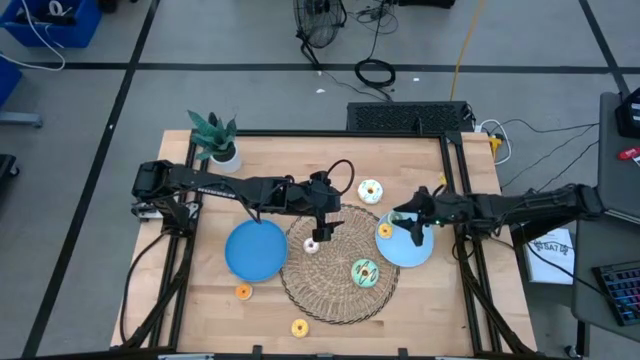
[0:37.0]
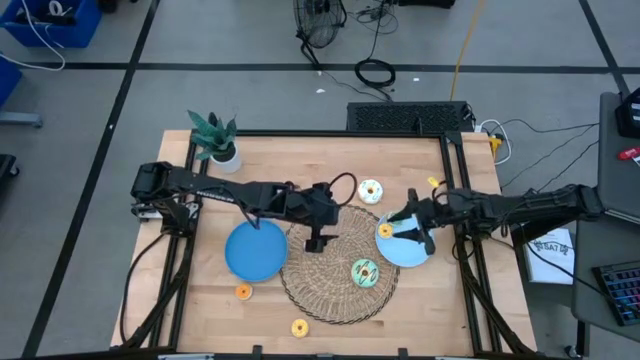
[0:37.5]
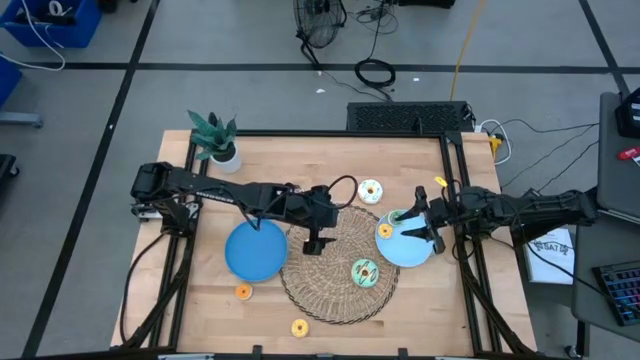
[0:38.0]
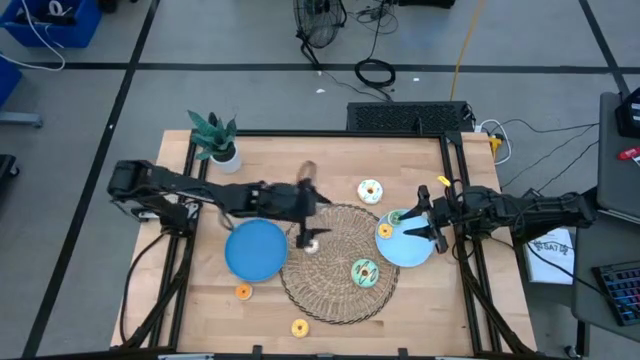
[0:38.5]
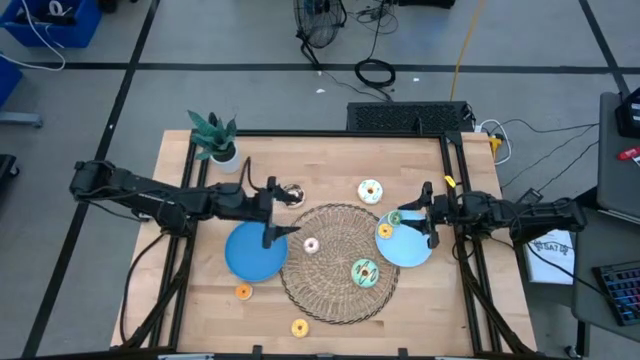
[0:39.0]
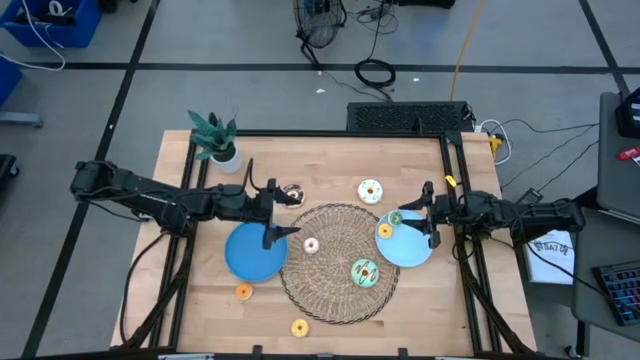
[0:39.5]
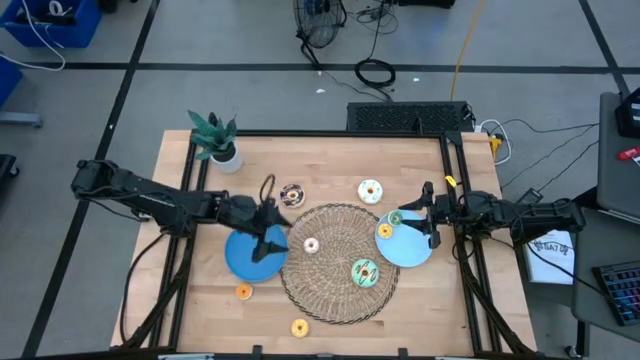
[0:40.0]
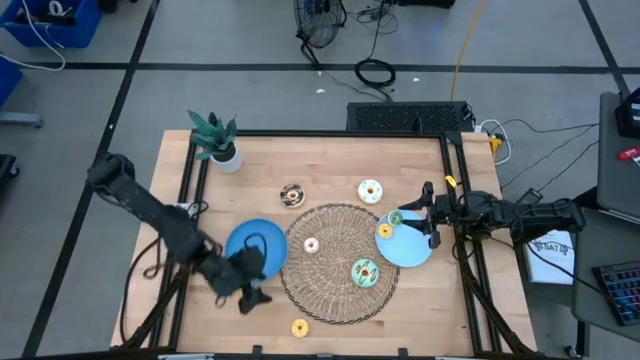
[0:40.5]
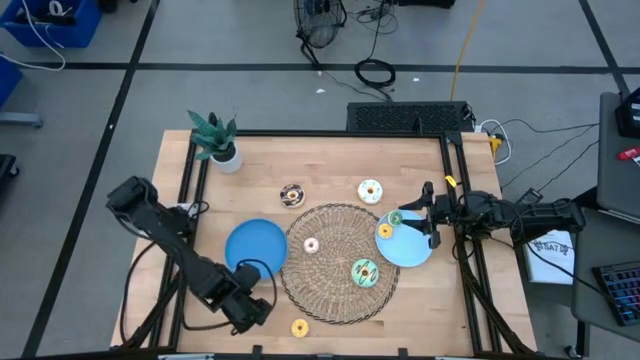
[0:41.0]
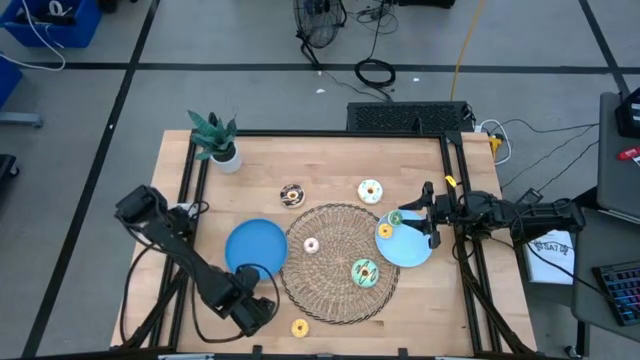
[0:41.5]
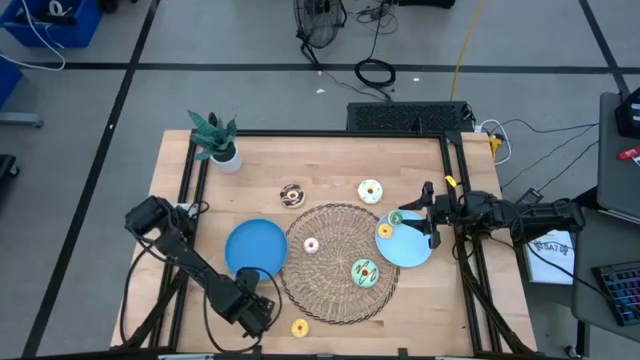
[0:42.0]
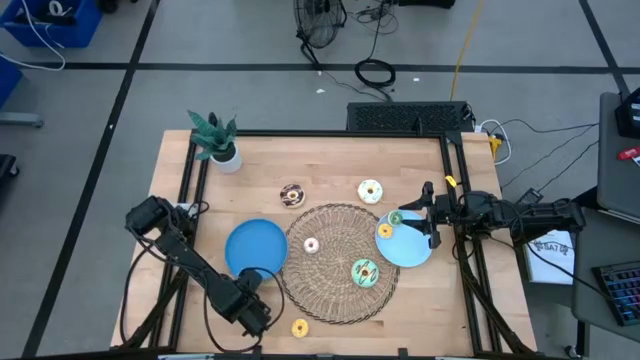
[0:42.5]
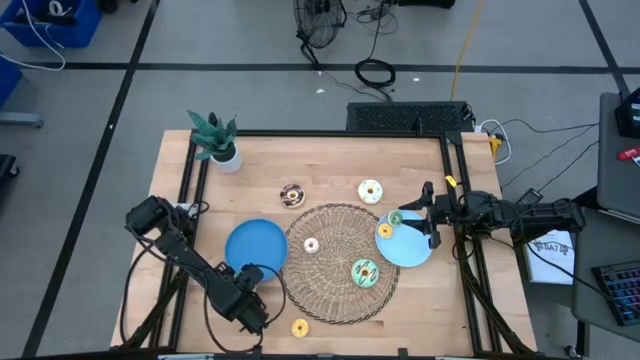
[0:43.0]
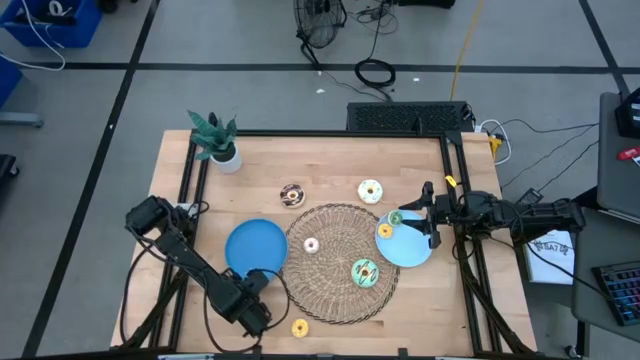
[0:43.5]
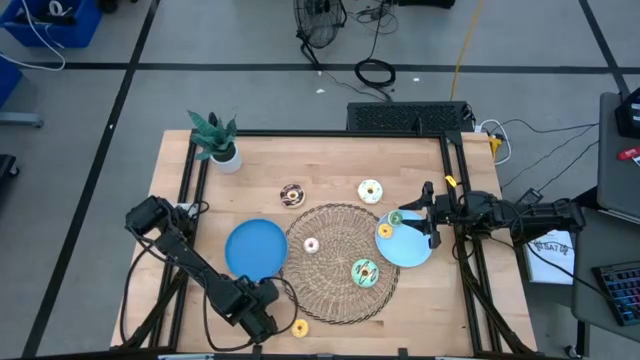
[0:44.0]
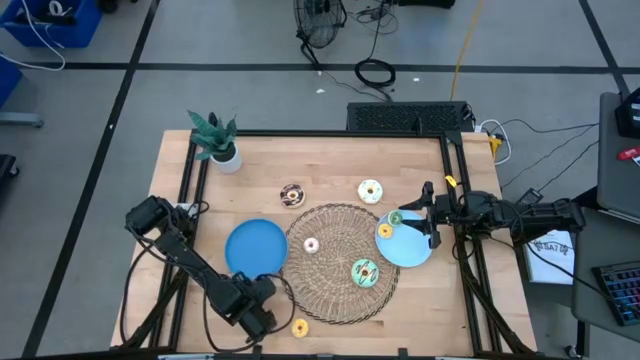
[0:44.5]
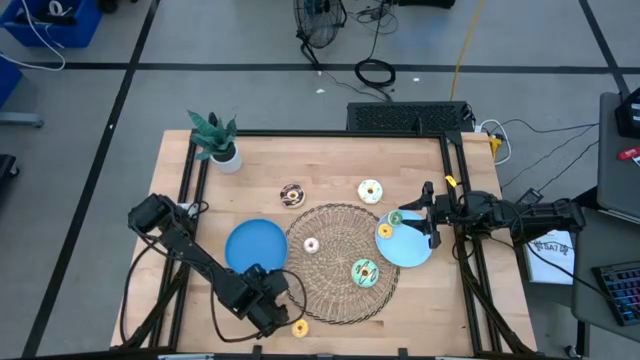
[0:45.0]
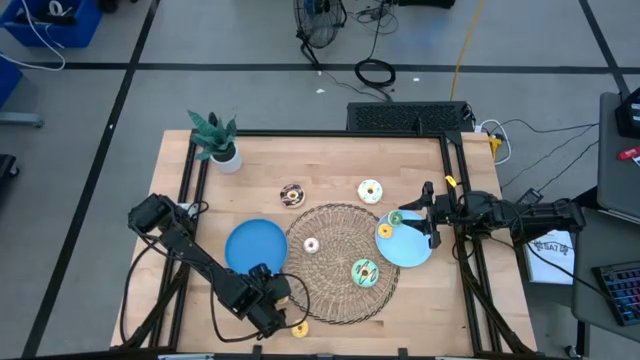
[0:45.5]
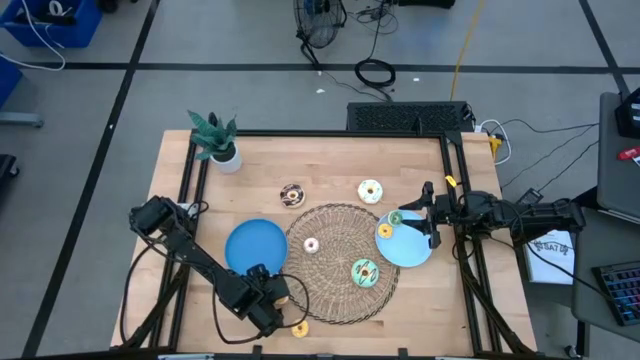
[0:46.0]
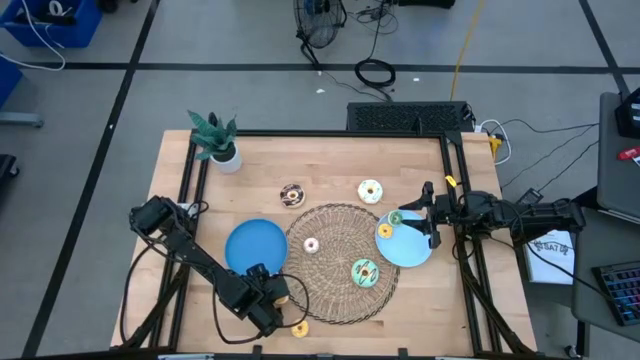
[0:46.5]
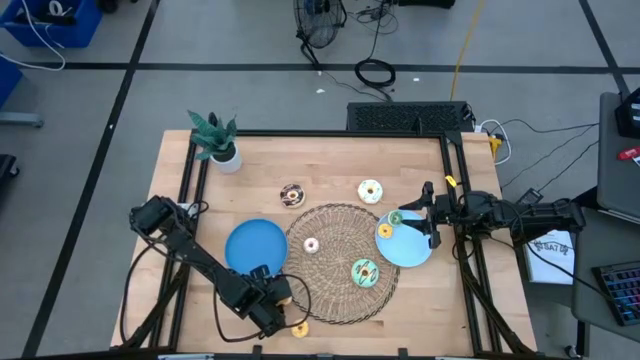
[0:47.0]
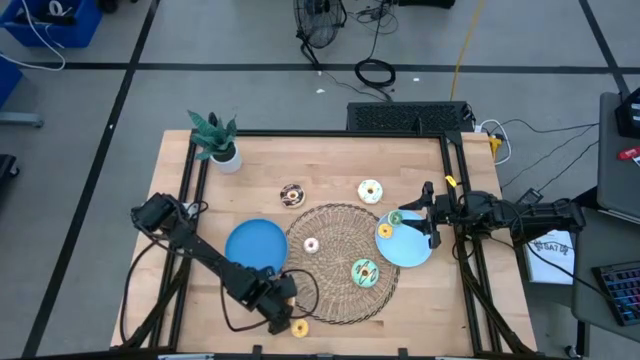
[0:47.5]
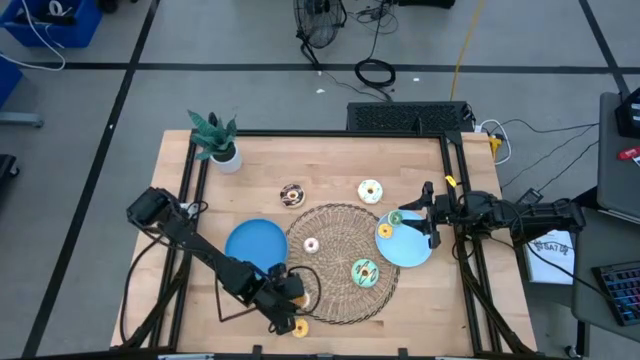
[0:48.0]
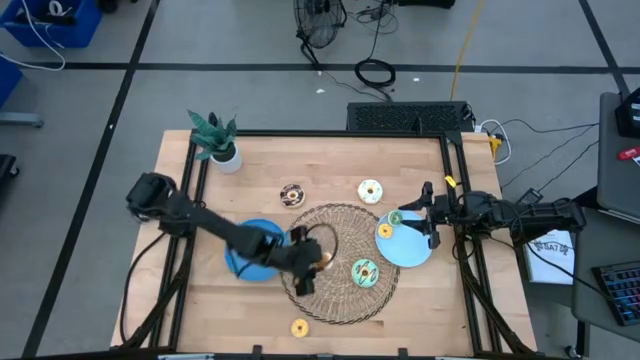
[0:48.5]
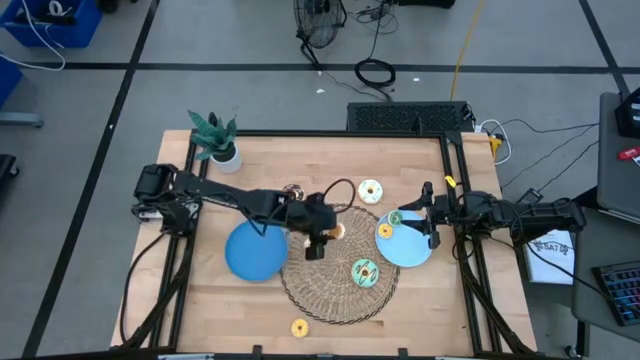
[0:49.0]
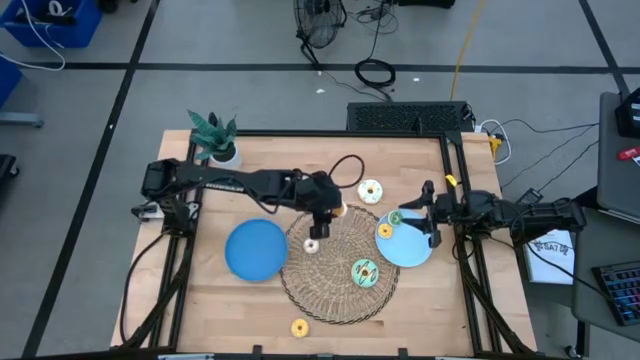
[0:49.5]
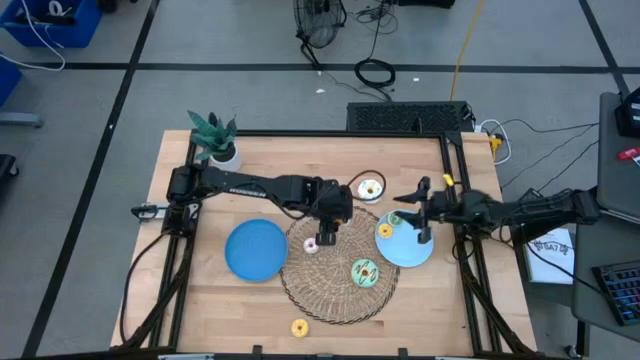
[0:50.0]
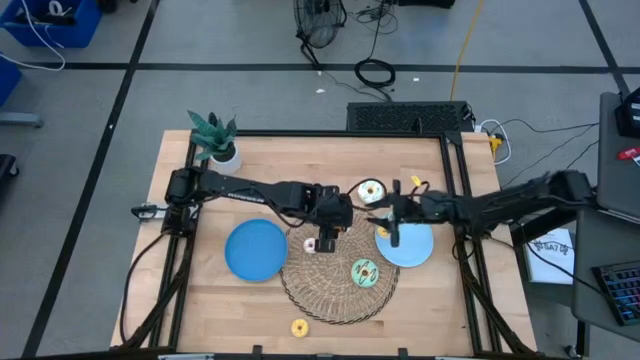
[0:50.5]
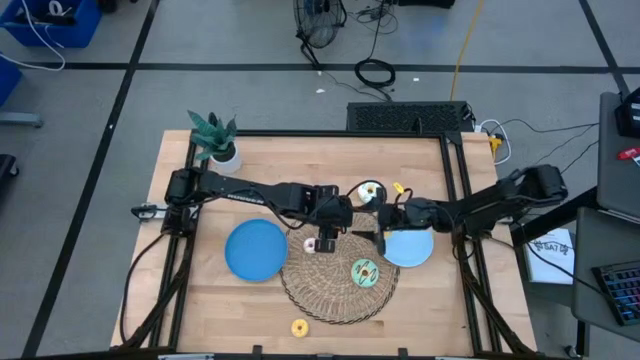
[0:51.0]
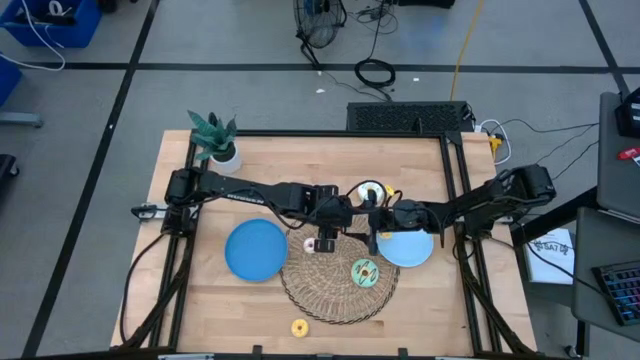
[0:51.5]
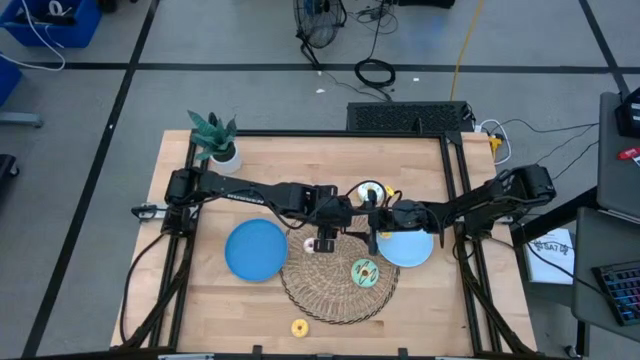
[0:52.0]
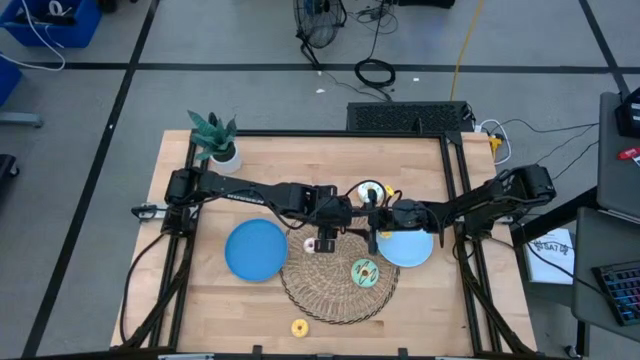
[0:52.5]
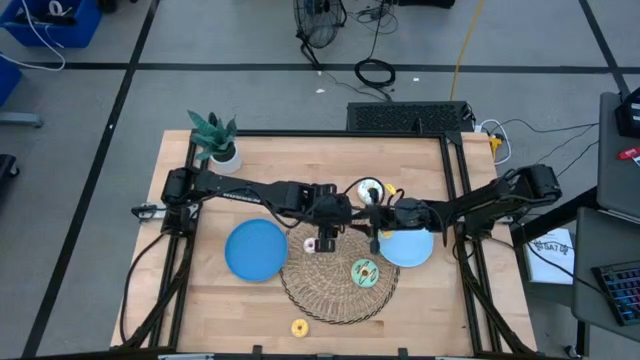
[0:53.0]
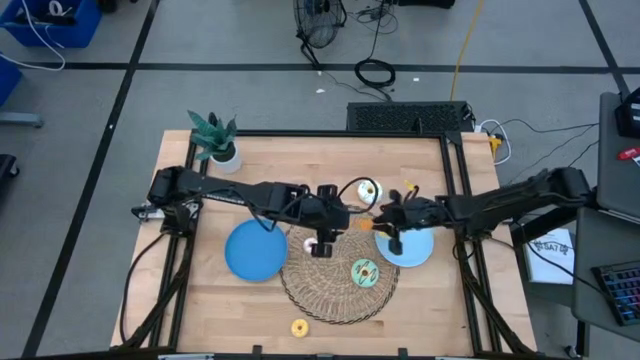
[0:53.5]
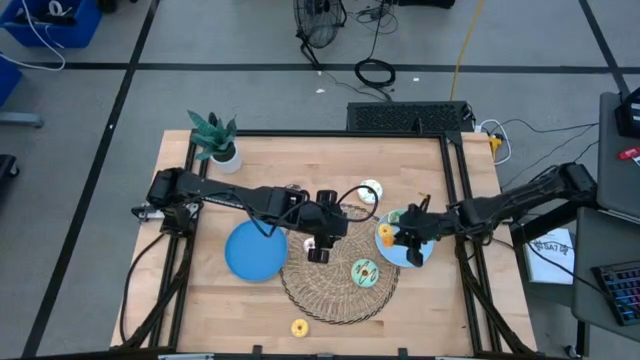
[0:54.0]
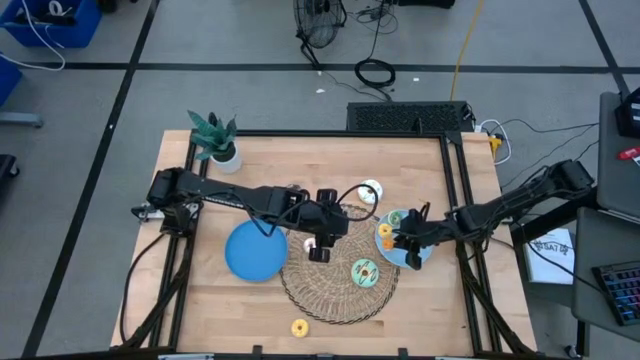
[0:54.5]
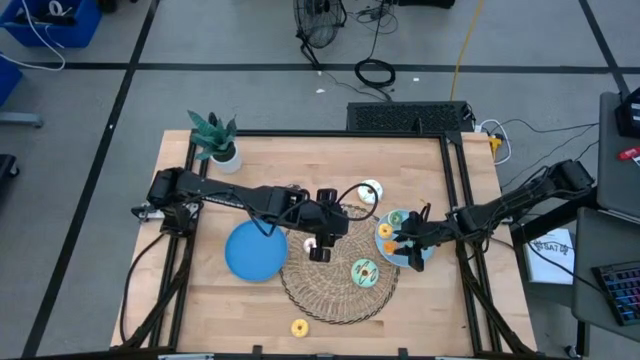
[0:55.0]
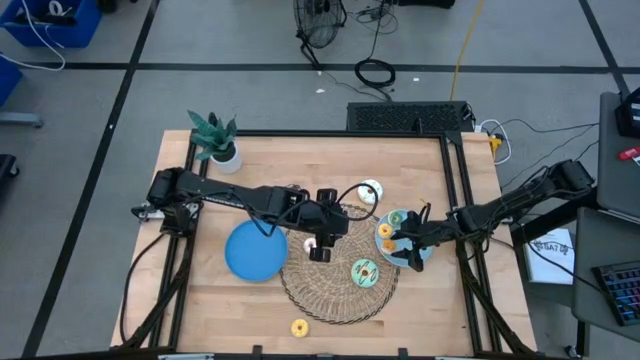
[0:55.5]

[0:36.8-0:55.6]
Task: Pick & Place donuts
Put the small orange donut on the light blue plate
